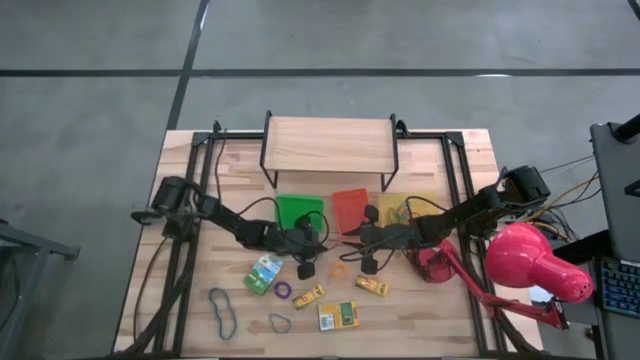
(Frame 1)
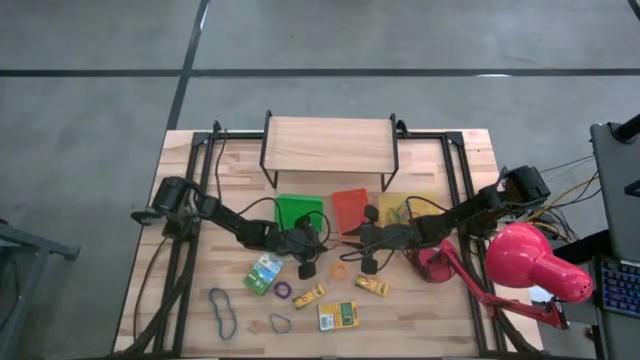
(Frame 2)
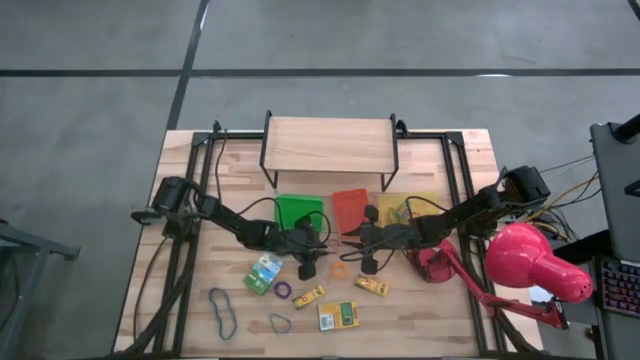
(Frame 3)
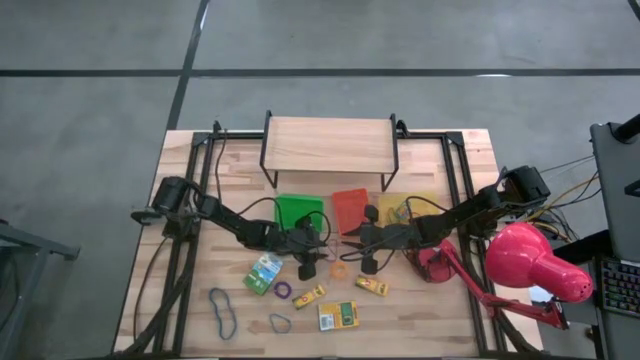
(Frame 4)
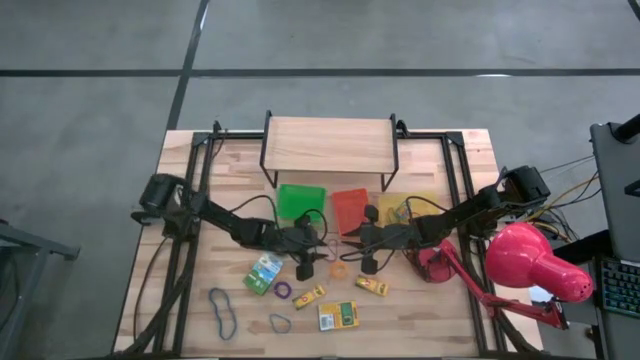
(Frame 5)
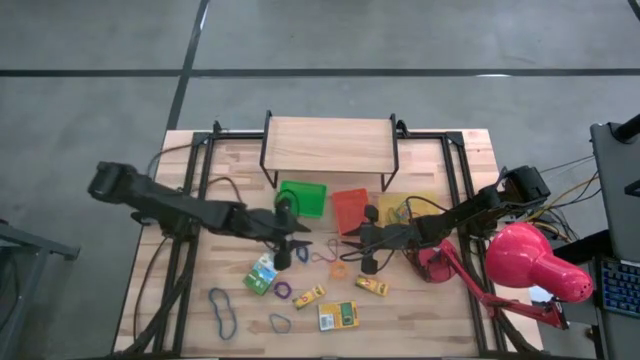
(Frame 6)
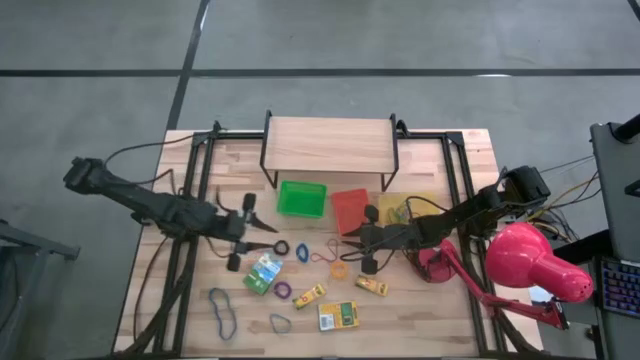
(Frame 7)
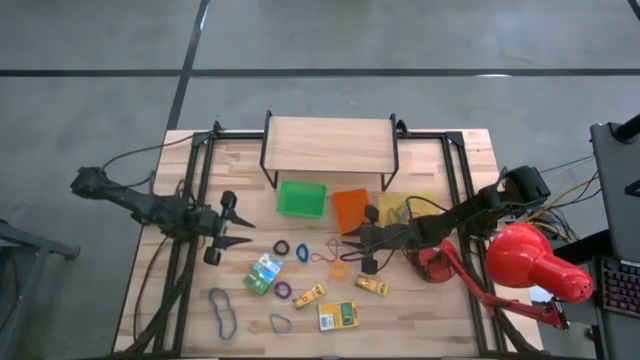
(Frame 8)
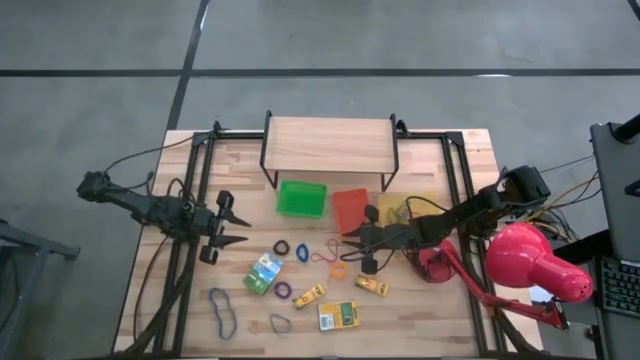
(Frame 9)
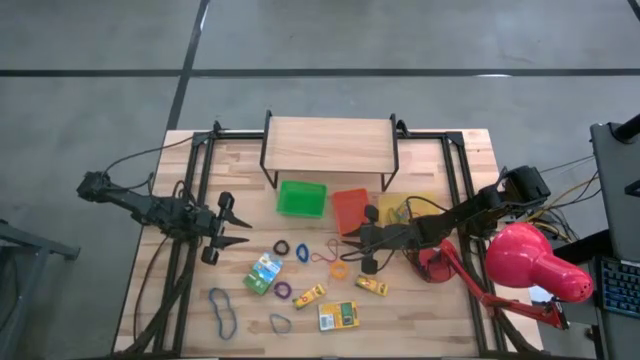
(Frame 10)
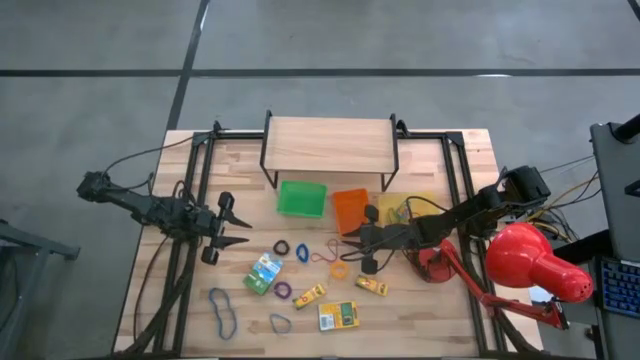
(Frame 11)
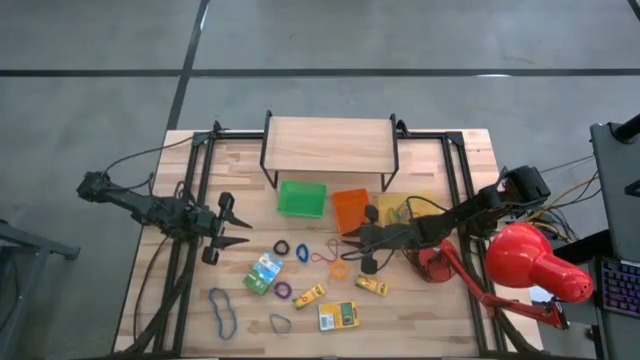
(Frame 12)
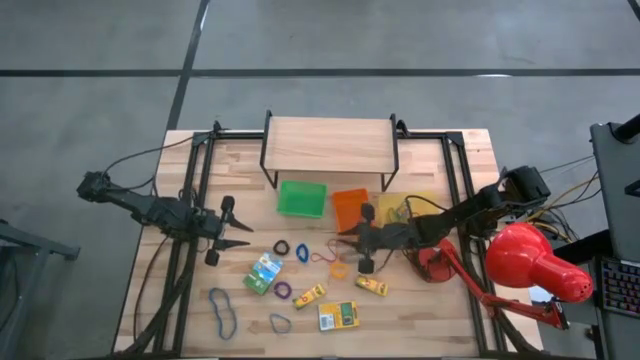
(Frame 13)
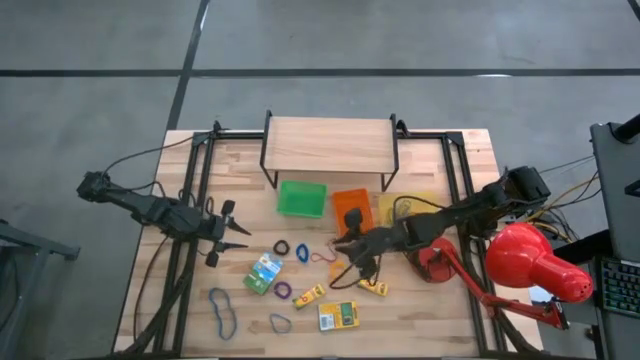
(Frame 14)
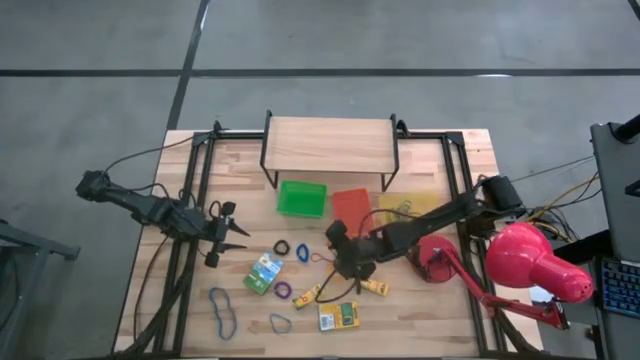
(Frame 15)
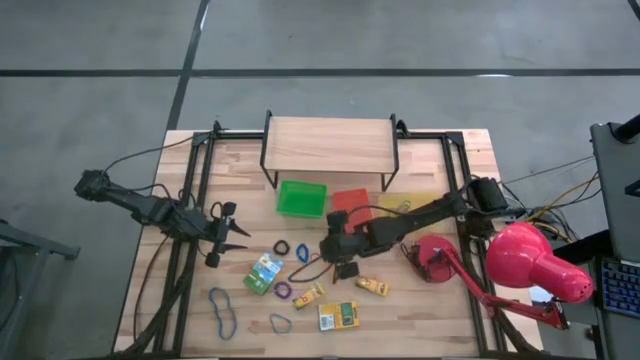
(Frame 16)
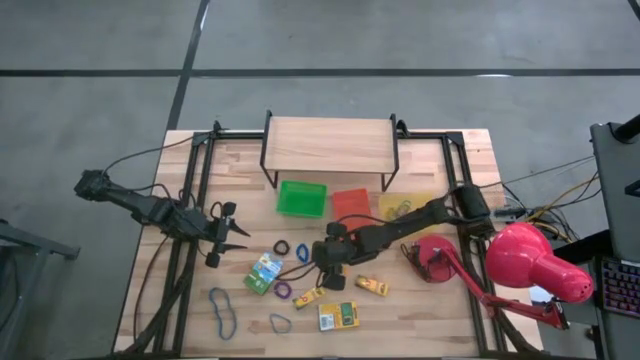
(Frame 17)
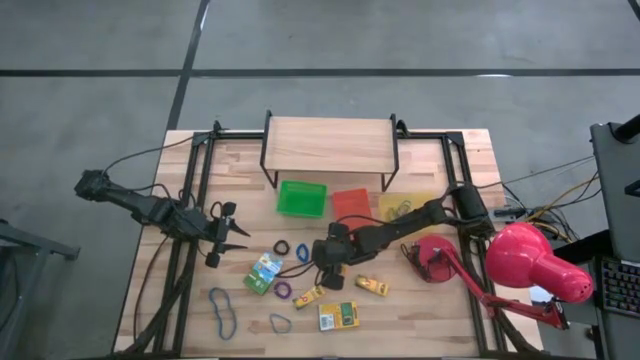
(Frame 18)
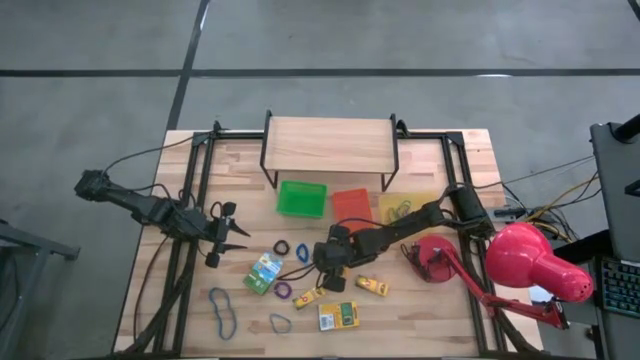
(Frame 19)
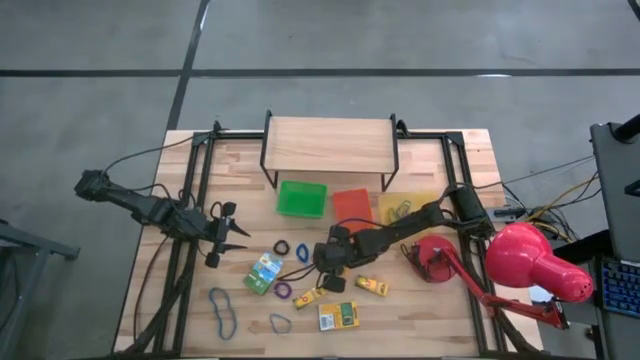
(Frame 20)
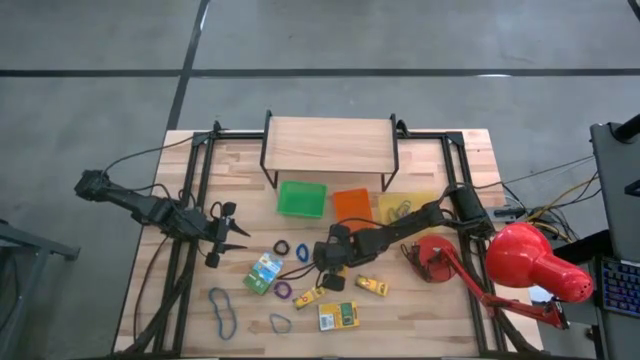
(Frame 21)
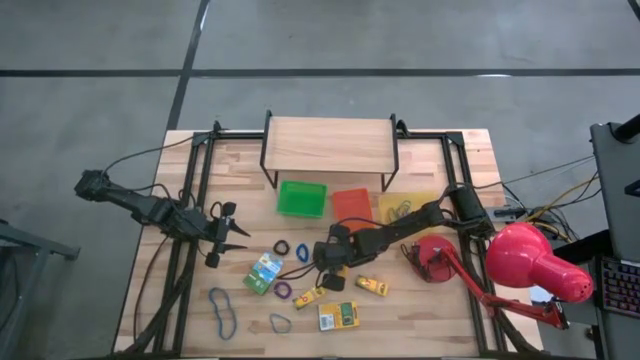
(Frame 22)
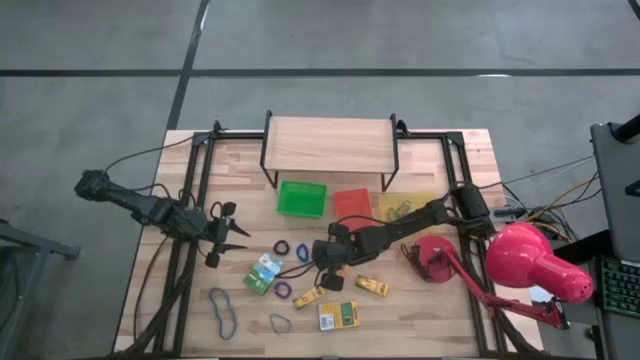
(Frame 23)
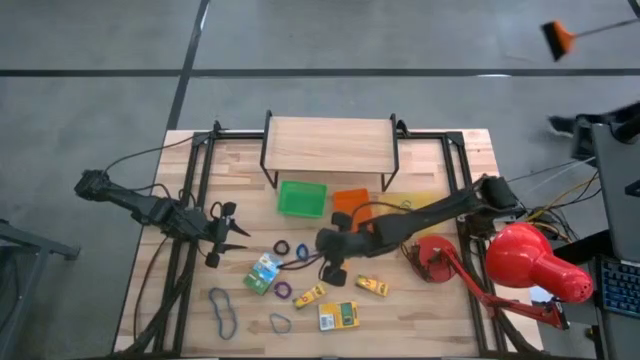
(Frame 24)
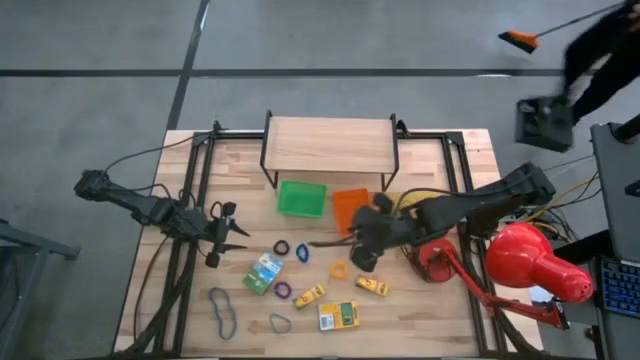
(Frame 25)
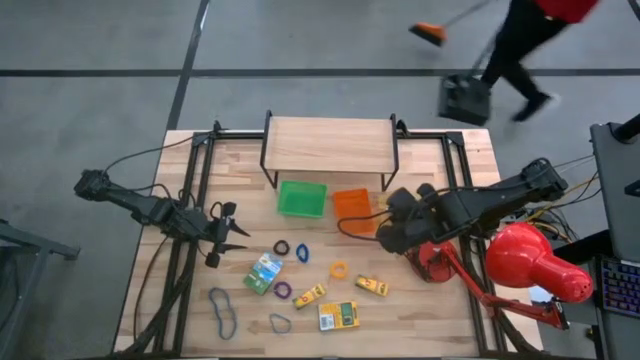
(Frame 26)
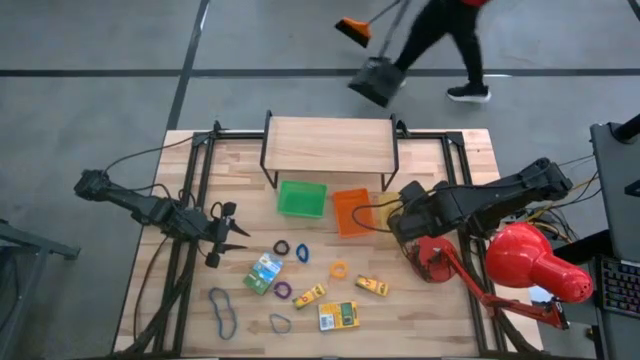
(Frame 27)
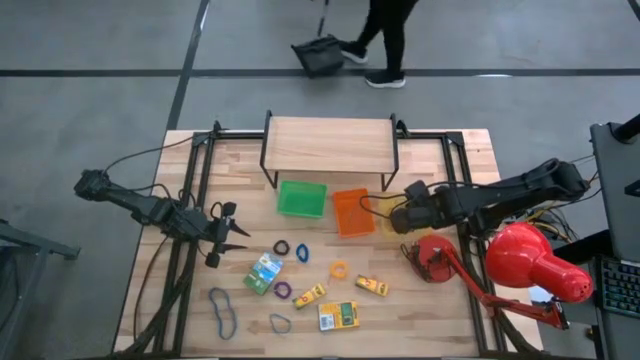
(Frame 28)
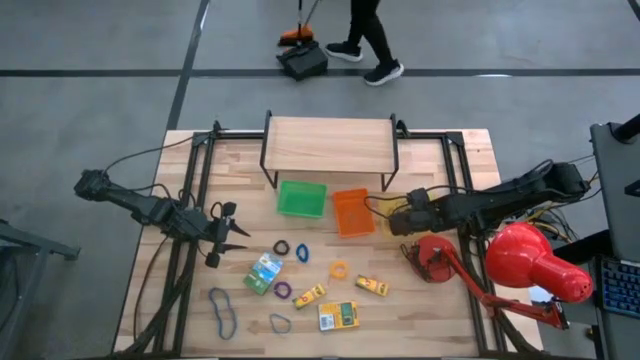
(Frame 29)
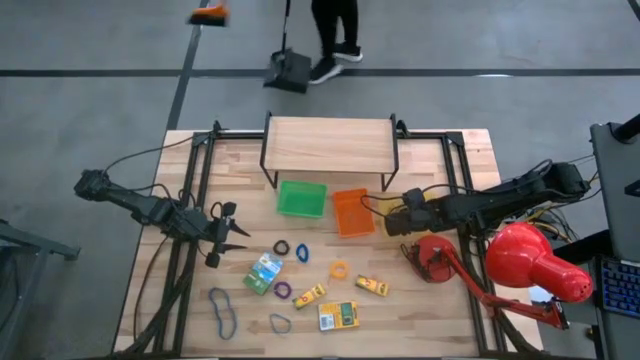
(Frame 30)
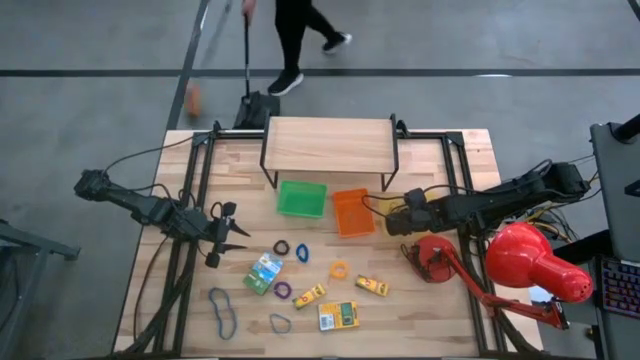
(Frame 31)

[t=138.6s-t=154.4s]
Task: Pick & Place Office Desk Supplies
Put the red rubber band into the yellow bin

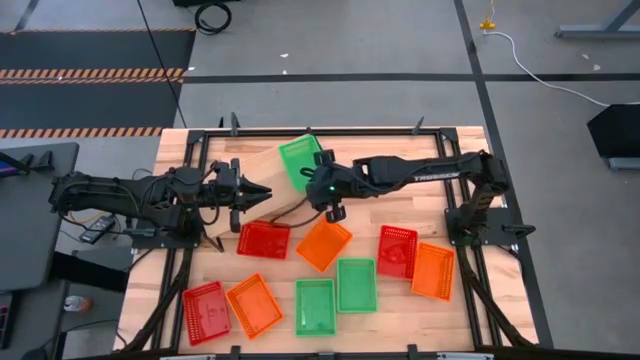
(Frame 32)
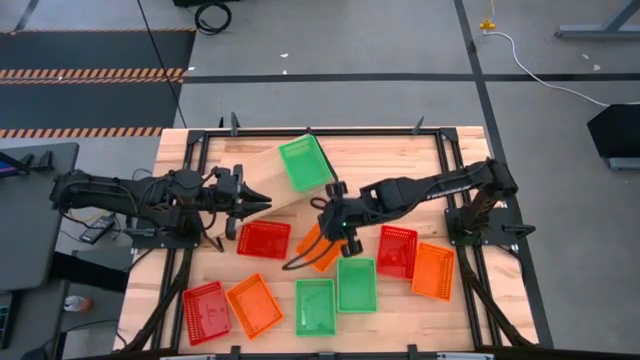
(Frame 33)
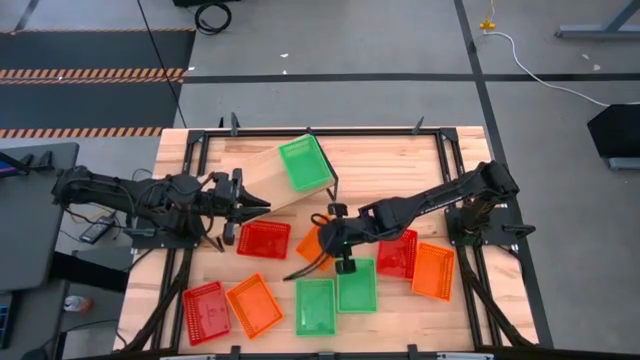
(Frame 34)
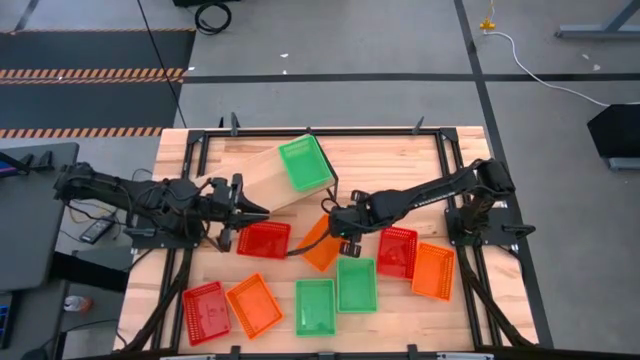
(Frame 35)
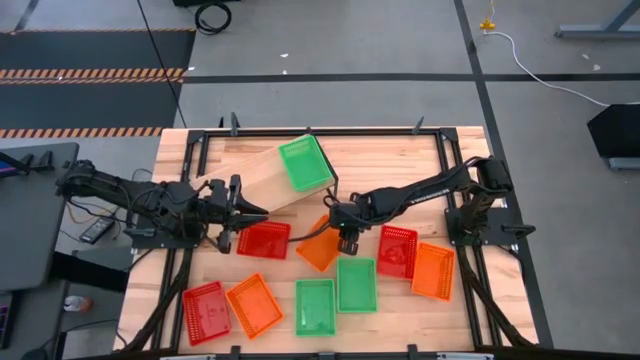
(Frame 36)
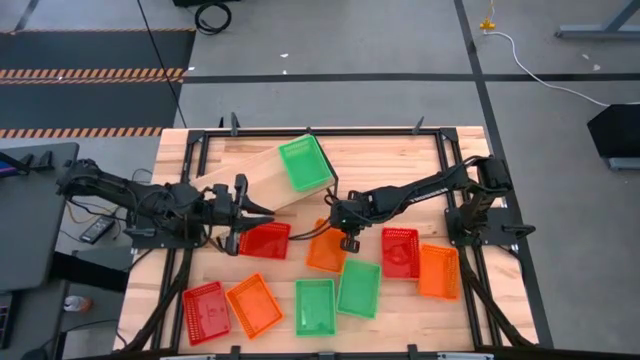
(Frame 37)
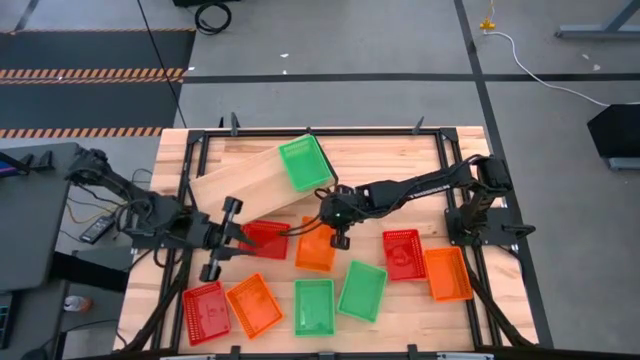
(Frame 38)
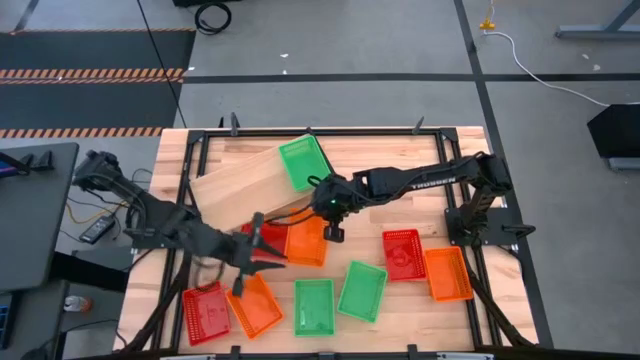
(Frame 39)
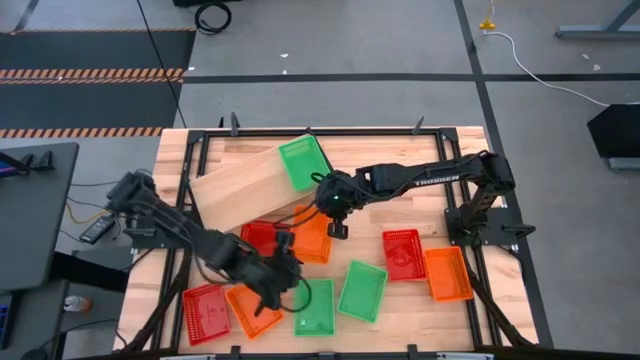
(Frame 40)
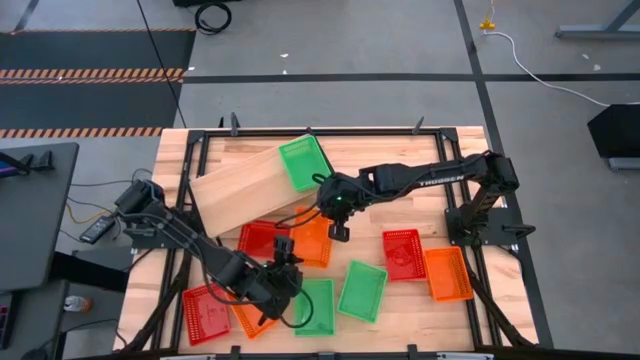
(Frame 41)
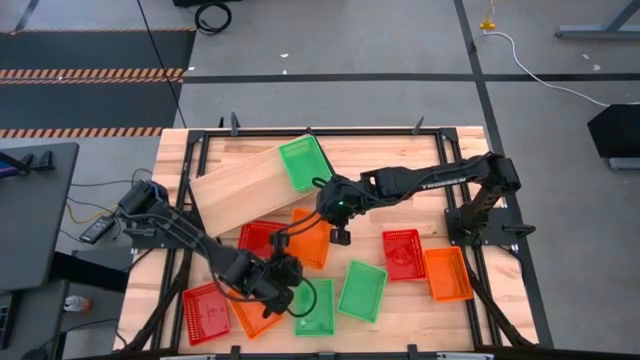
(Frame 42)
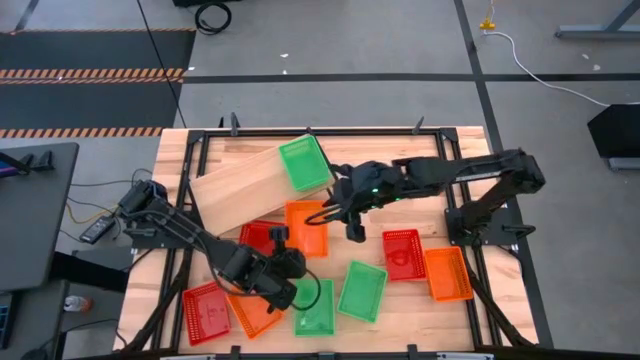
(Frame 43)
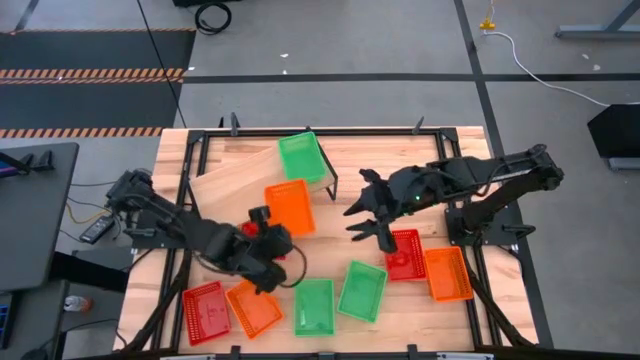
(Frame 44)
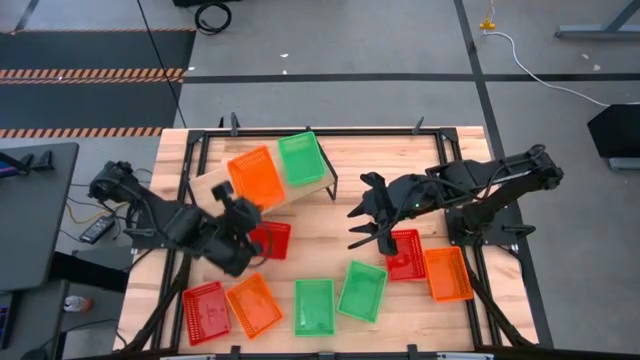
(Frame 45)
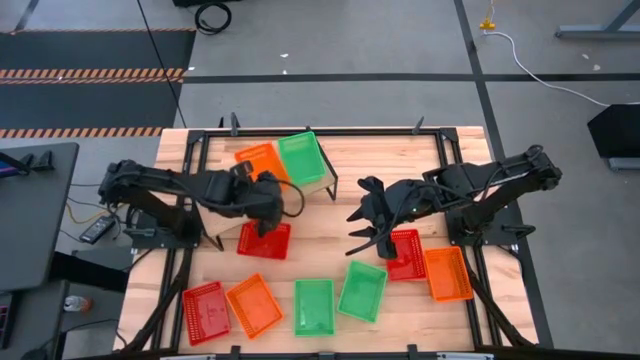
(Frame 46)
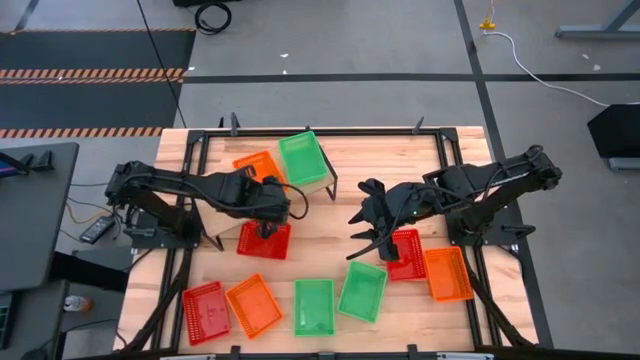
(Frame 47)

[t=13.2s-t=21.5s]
Task: Stack baskets on shelf by color
Put the top left orange bin on the shelf
